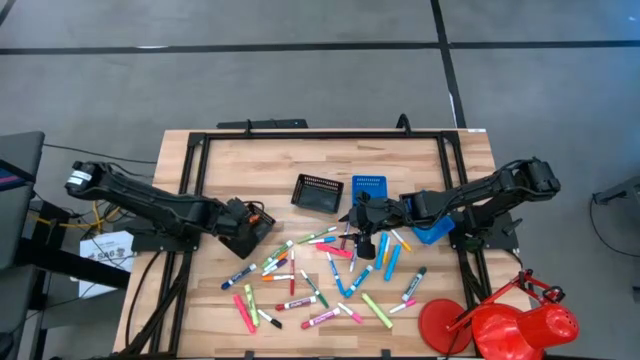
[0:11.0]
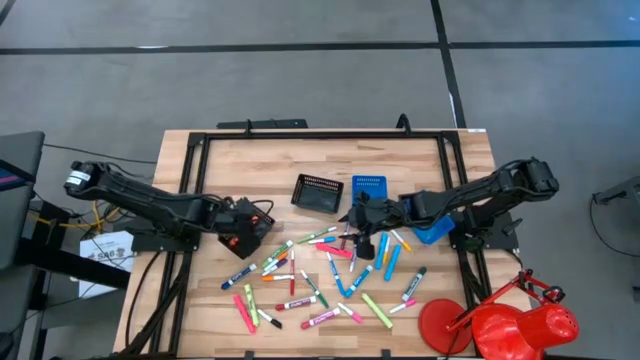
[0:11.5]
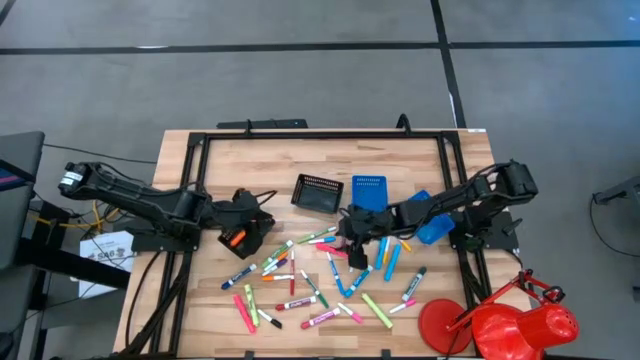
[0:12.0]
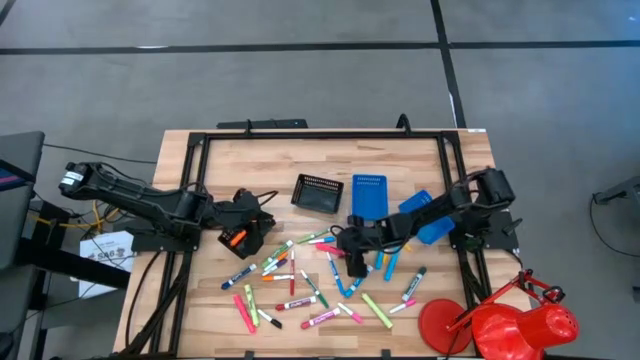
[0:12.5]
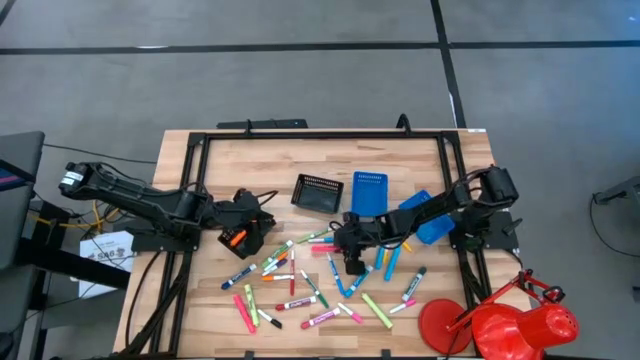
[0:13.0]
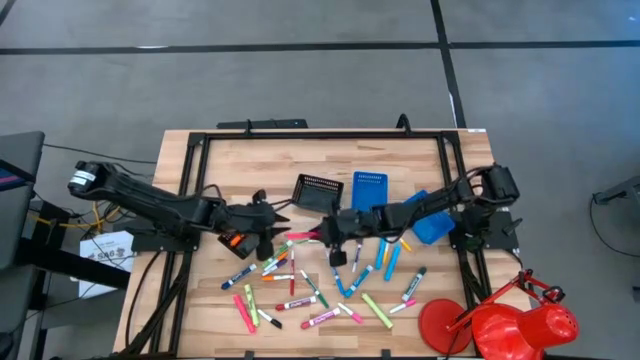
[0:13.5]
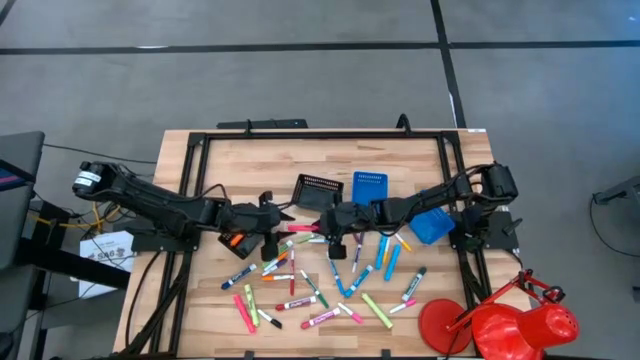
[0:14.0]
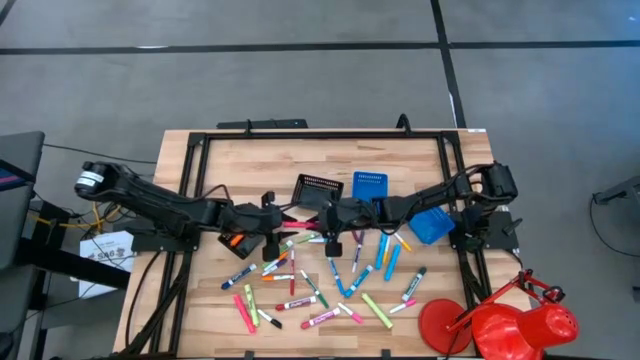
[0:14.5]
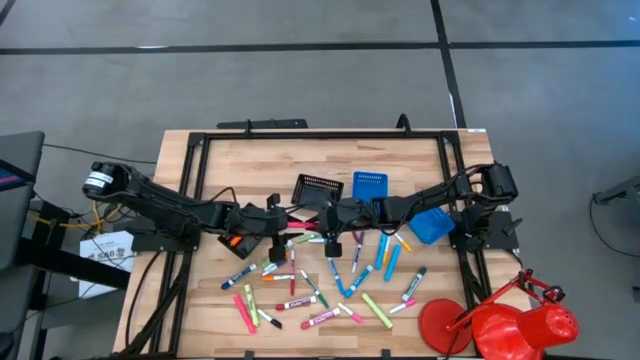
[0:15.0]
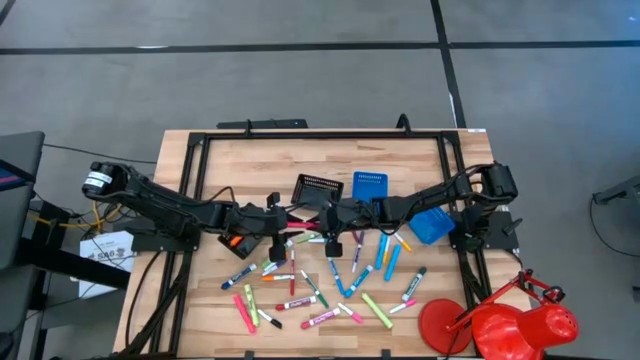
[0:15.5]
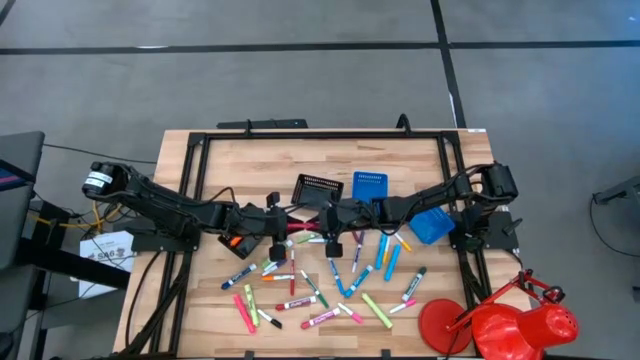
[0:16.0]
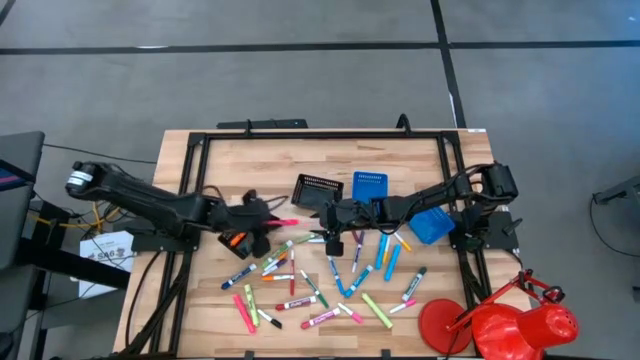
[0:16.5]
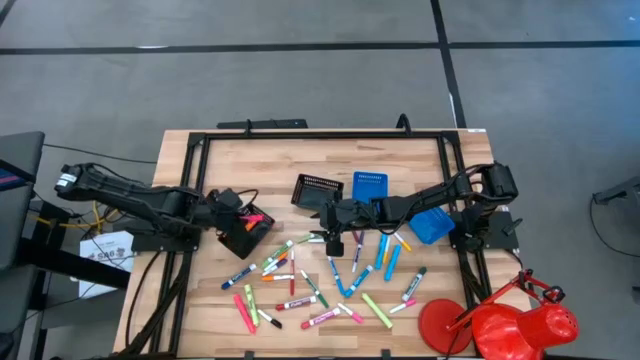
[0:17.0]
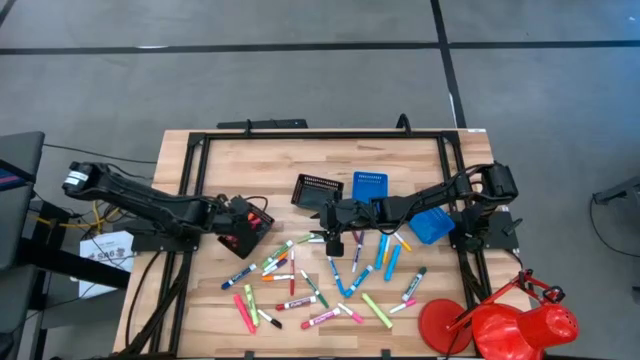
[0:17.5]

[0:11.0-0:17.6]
Task: Pick & Place Markers
Put the top pink highlighter into the left black bin

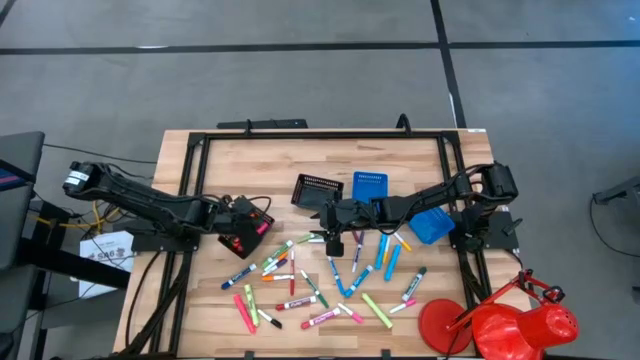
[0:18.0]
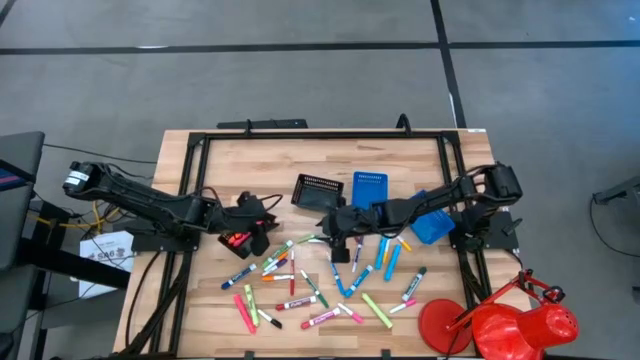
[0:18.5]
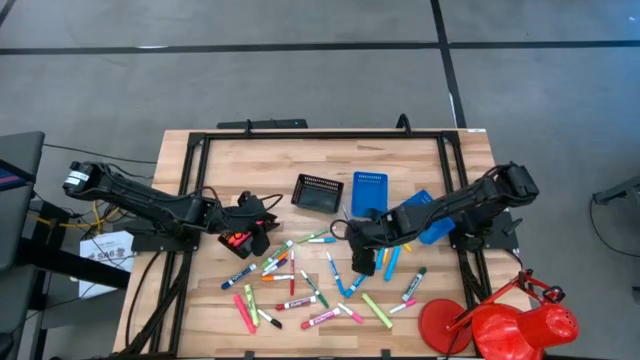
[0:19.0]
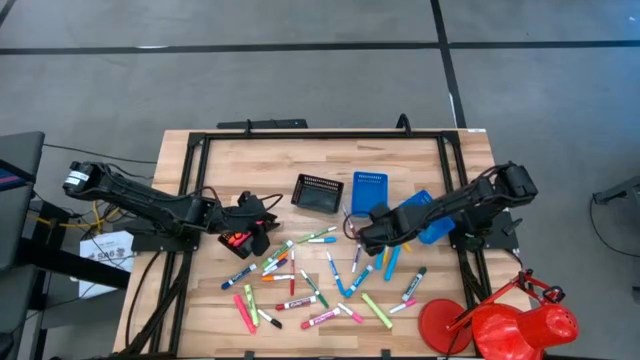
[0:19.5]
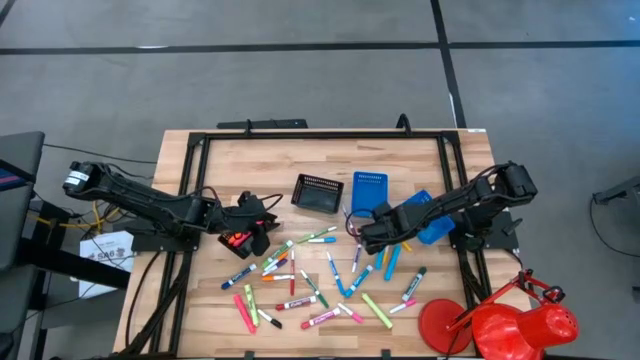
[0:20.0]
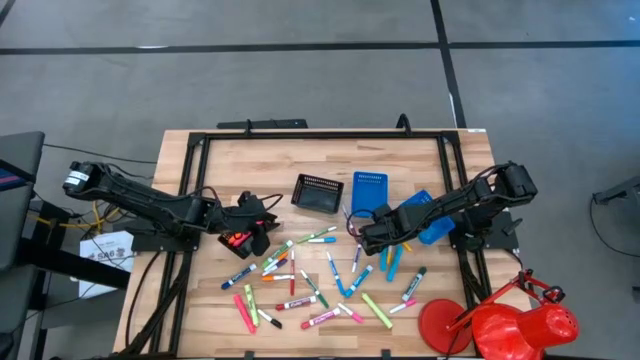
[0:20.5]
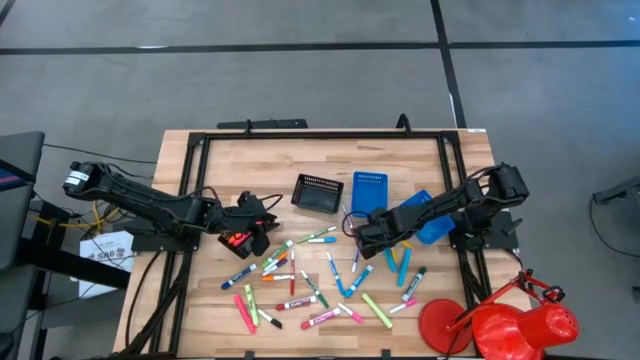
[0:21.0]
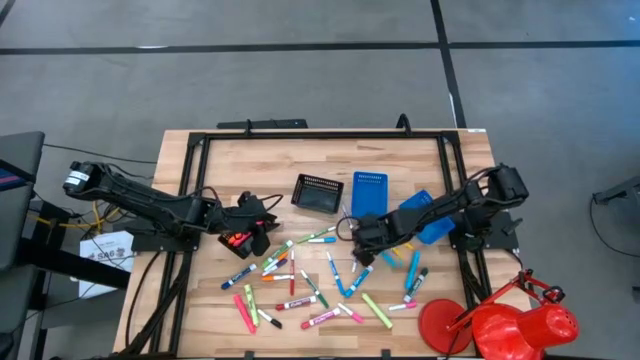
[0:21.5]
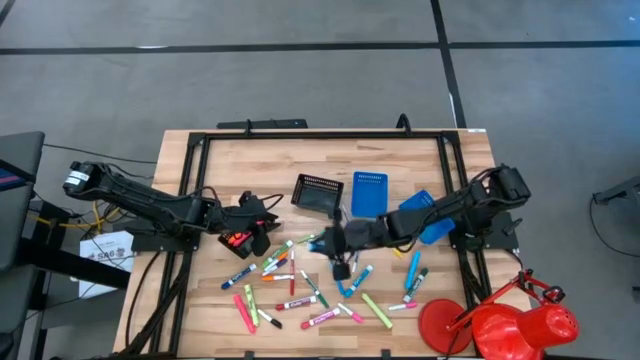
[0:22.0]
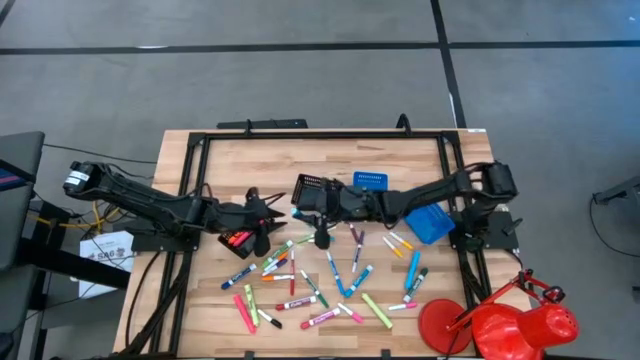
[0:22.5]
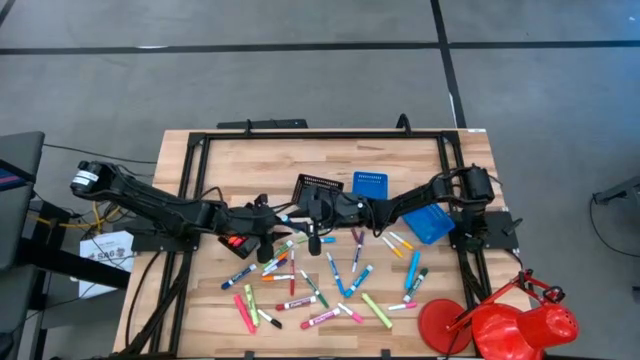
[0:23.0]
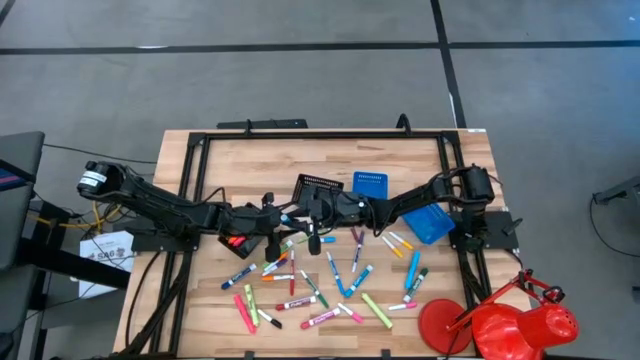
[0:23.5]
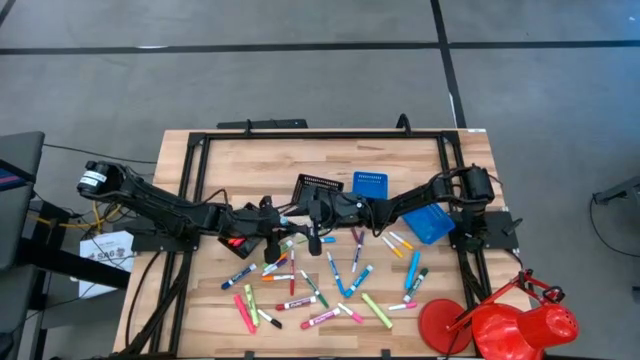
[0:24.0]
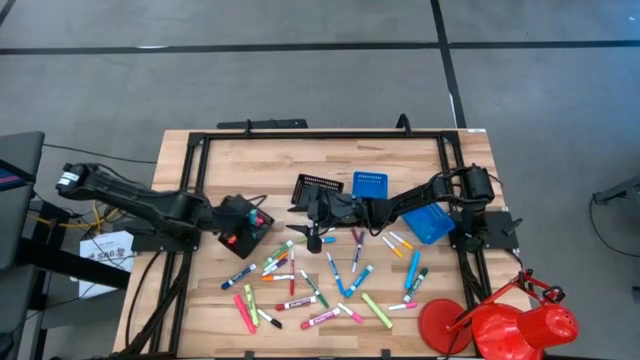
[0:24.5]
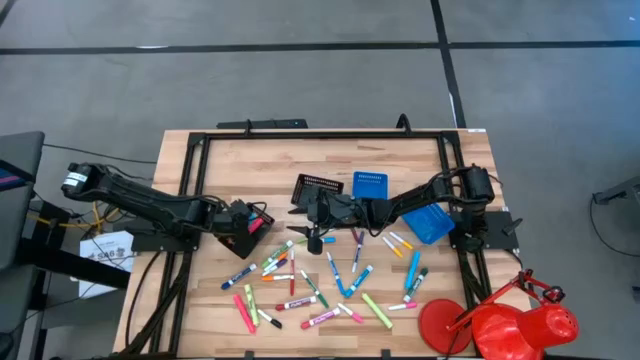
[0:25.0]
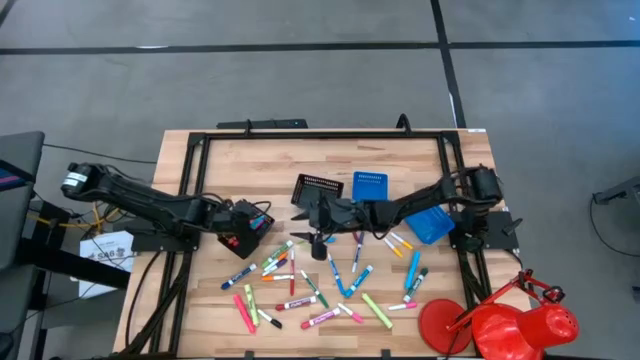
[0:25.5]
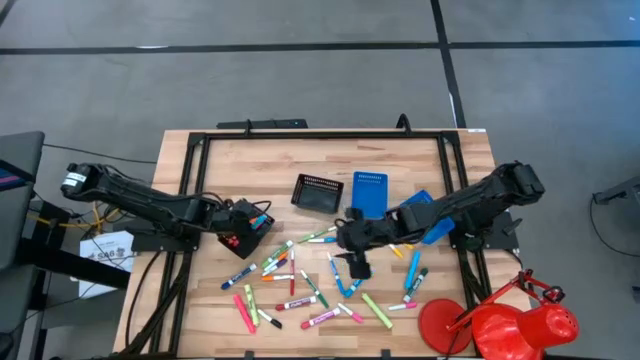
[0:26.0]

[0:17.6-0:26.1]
Put the left blue highlighter into the left black bin

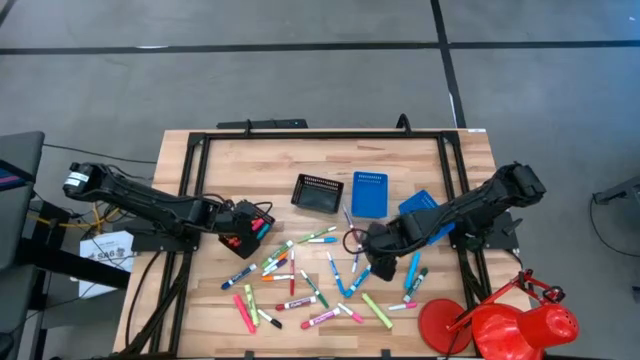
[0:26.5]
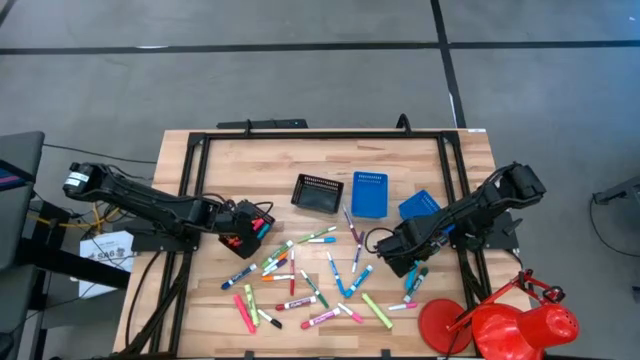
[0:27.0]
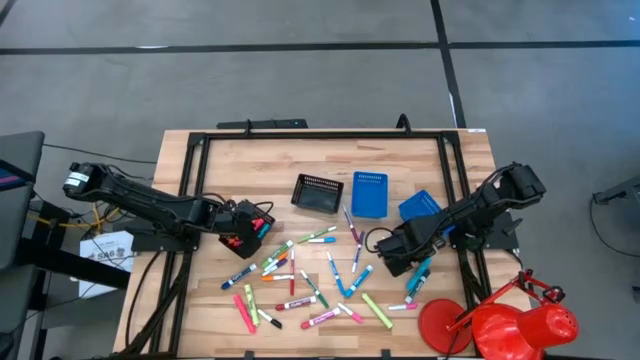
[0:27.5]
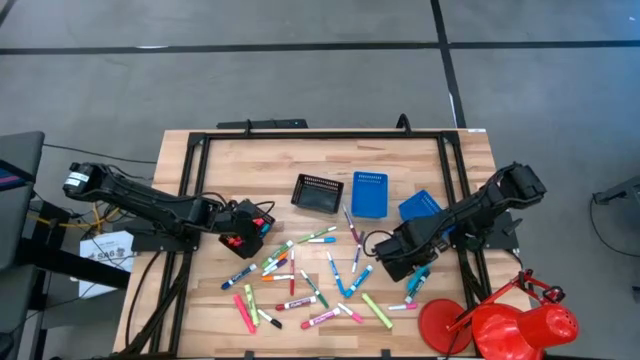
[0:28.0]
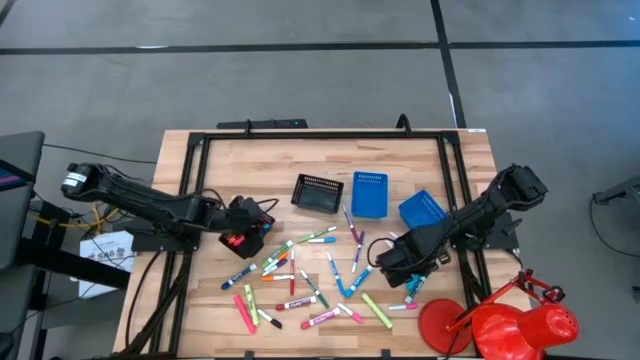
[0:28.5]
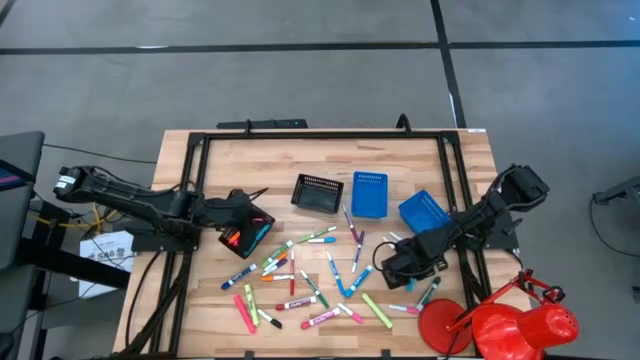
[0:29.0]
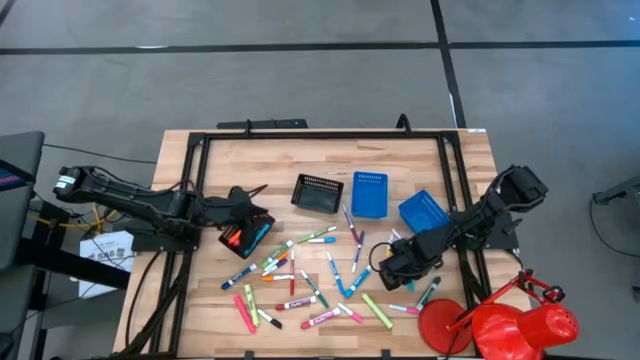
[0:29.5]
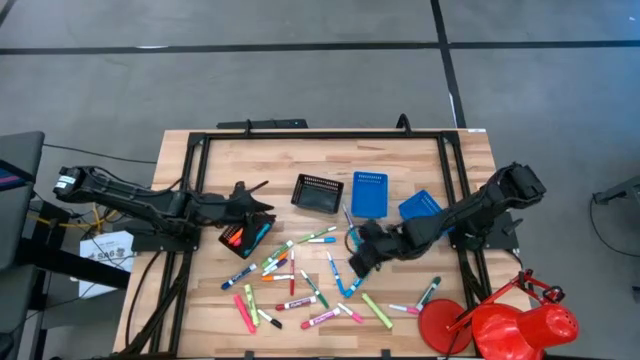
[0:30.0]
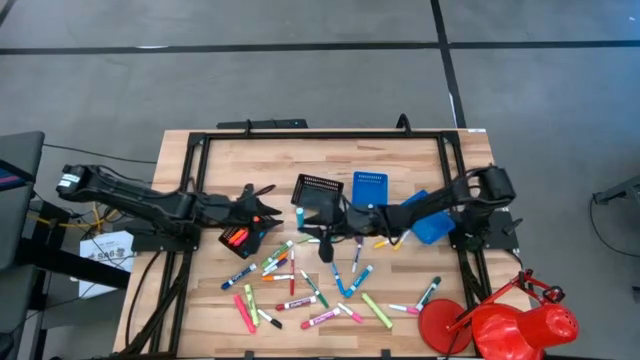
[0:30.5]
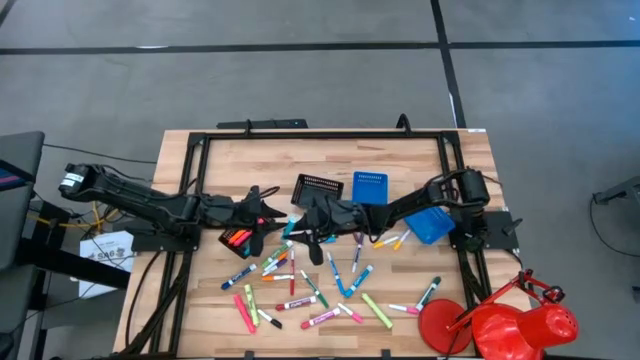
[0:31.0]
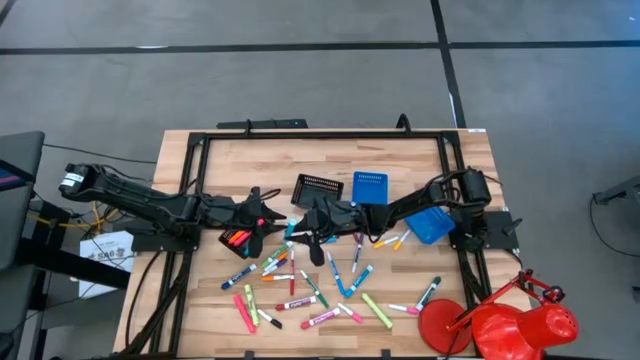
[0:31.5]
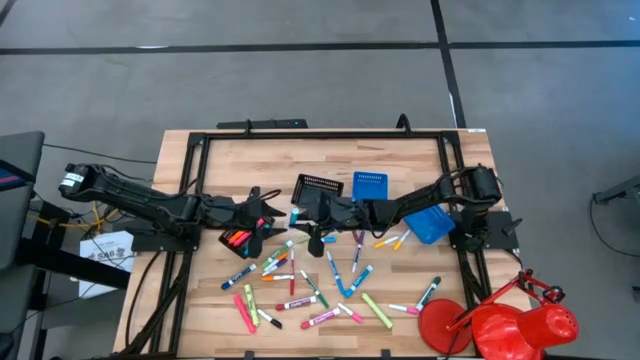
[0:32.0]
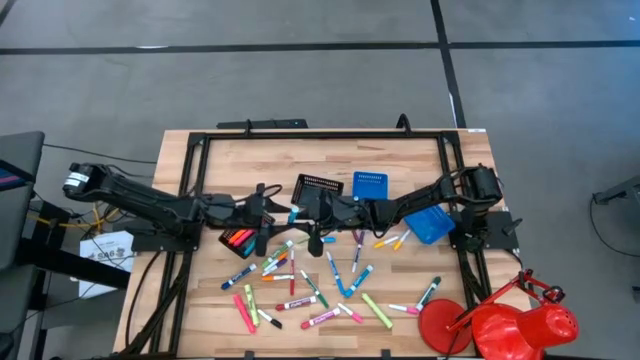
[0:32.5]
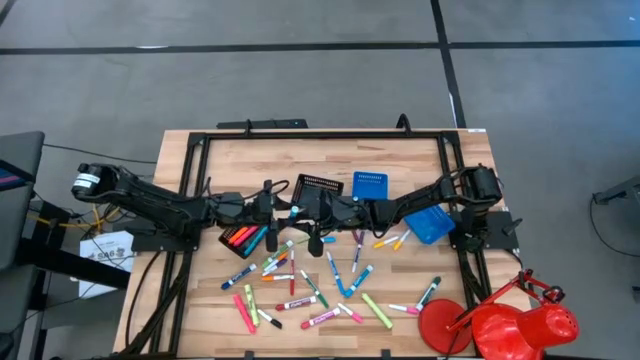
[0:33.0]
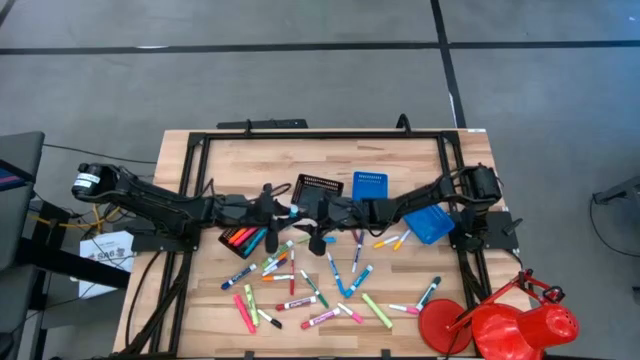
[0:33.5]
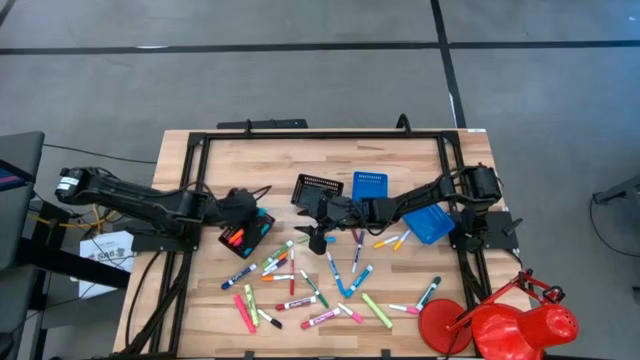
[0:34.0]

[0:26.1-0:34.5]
Put the blue highlighter into the left black bin
